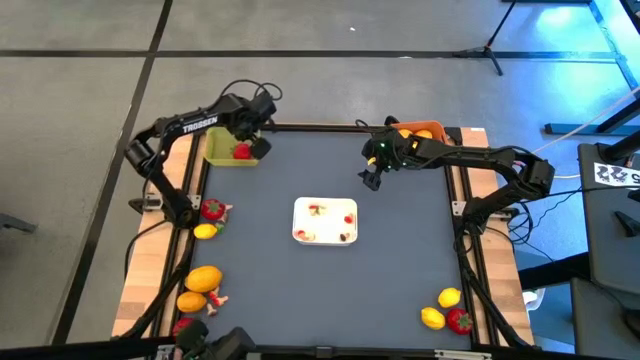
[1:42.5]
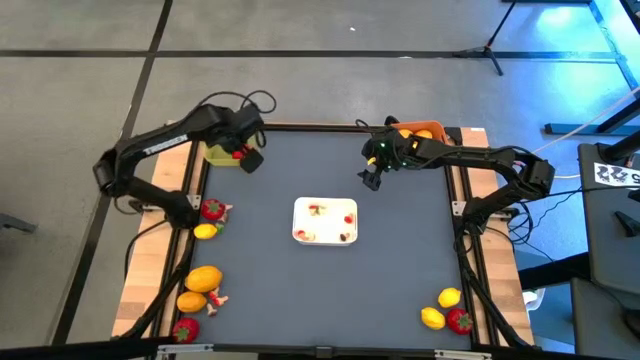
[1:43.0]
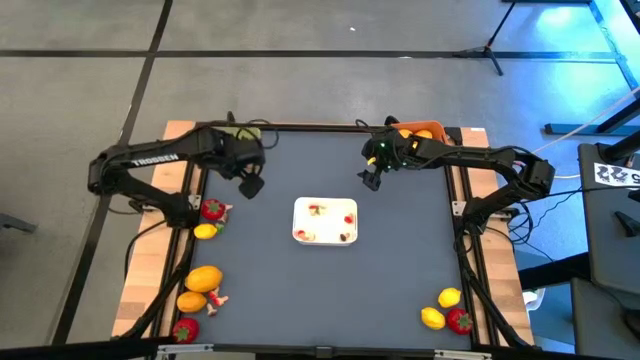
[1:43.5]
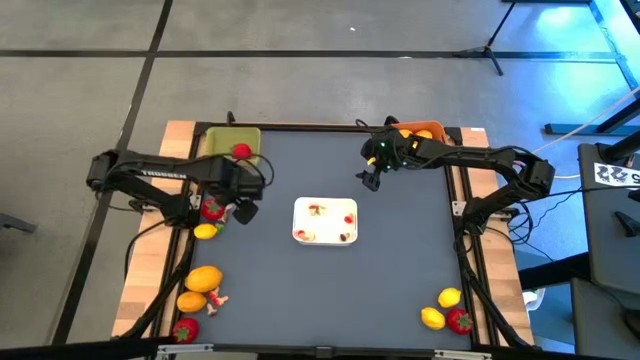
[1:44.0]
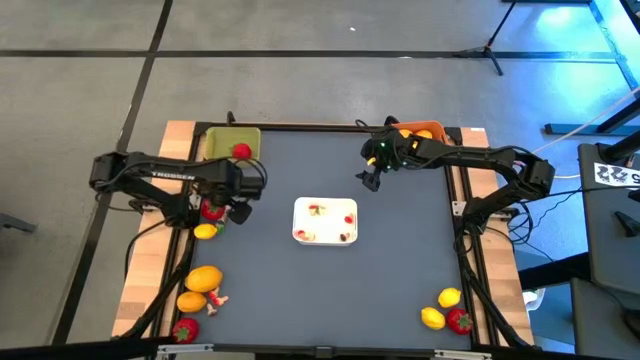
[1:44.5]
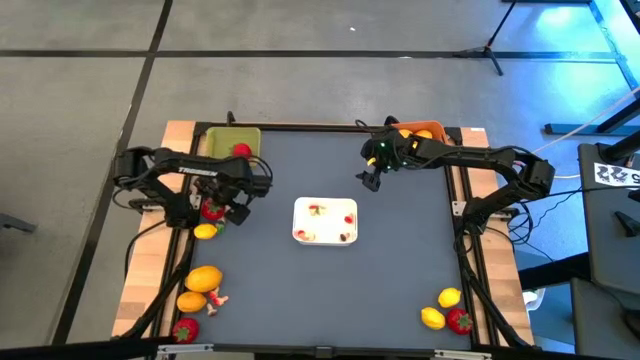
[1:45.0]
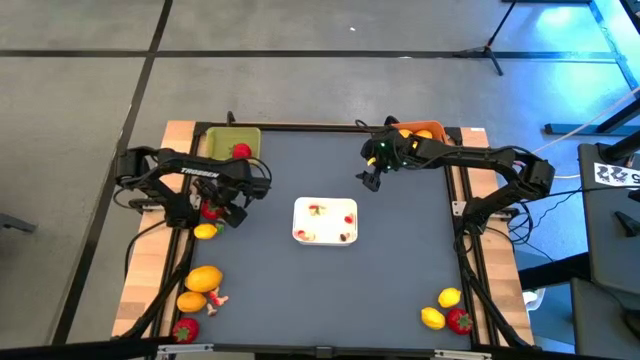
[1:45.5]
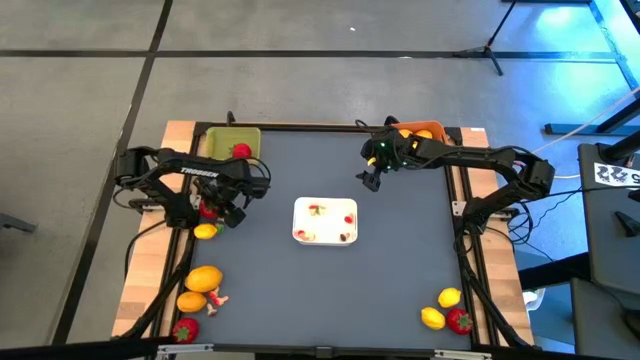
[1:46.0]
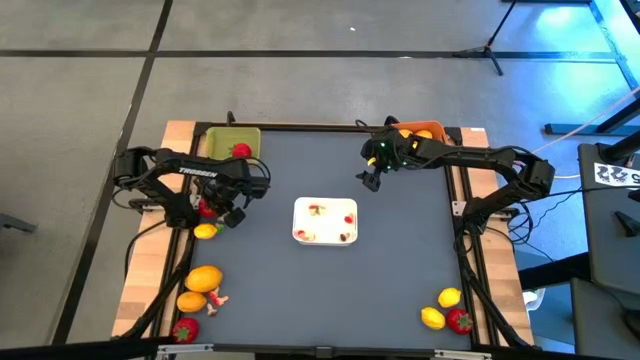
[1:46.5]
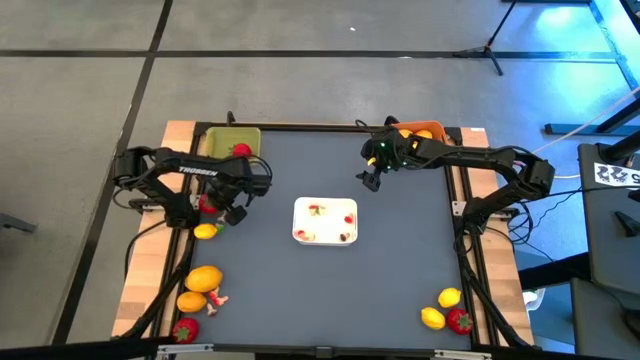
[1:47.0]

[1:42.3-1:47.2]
Task: Sort produce into baskets
Put the red tomato into the yellow bin

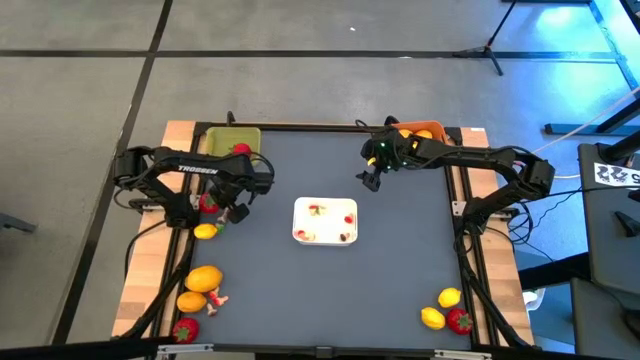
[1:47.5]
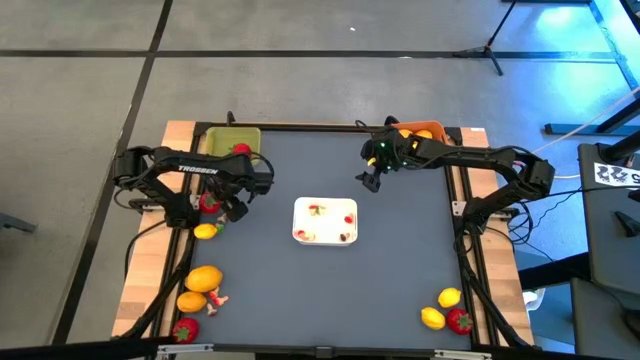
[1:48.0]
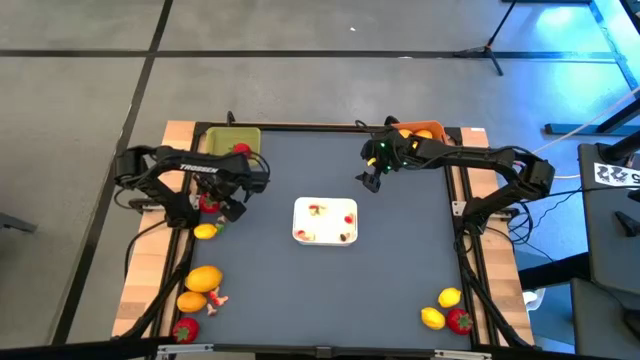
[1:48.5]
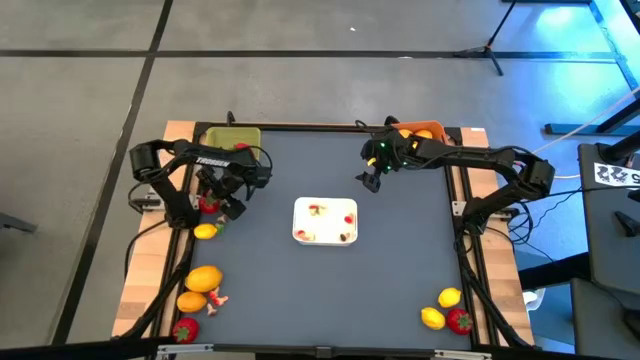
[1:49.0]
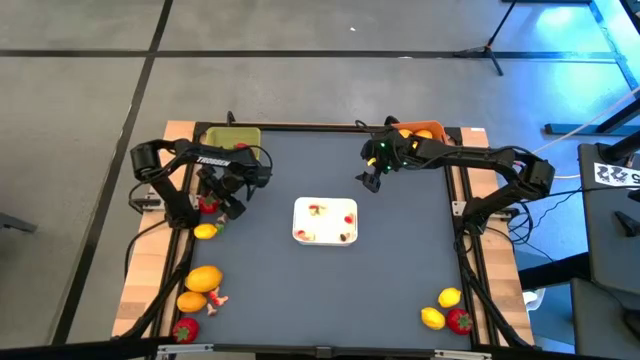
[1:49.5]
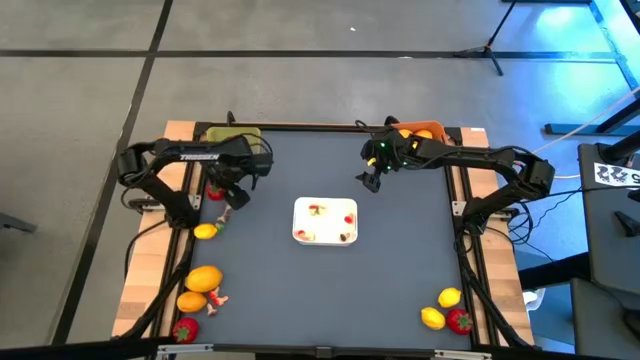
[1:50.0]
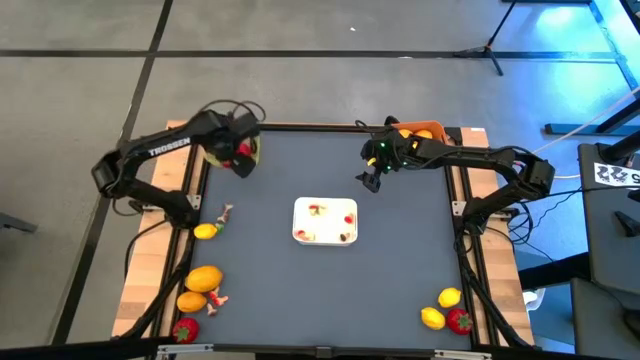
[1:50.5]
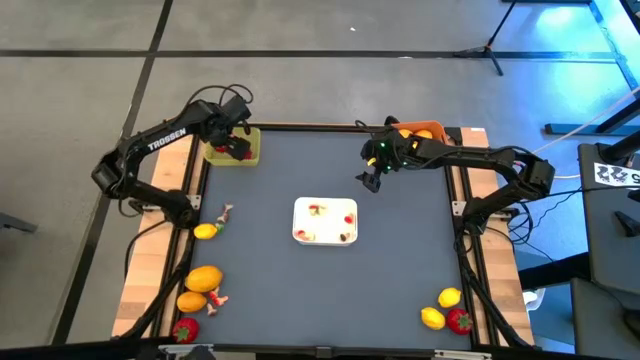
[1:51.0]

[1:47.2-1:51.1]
Put the red tomato into the yellow bin

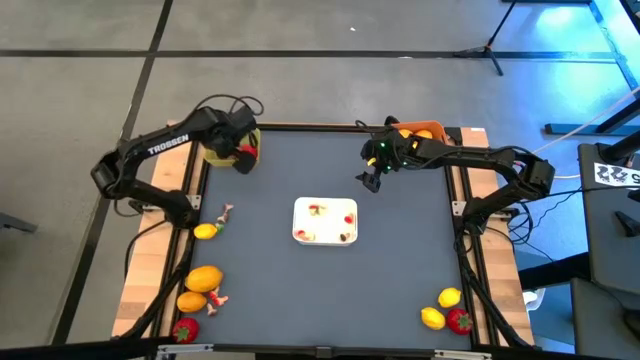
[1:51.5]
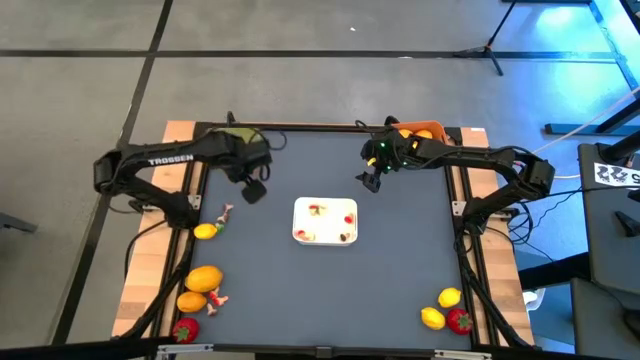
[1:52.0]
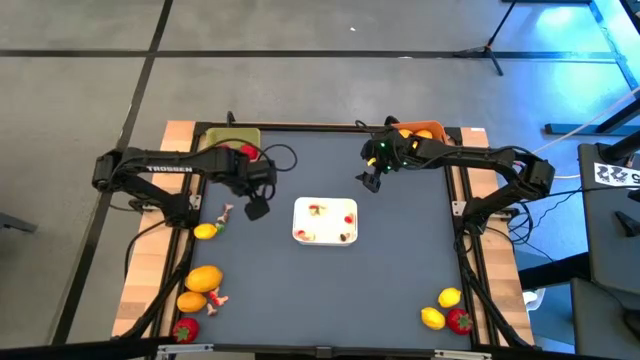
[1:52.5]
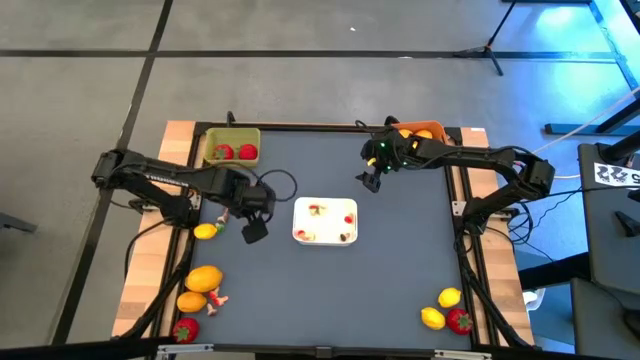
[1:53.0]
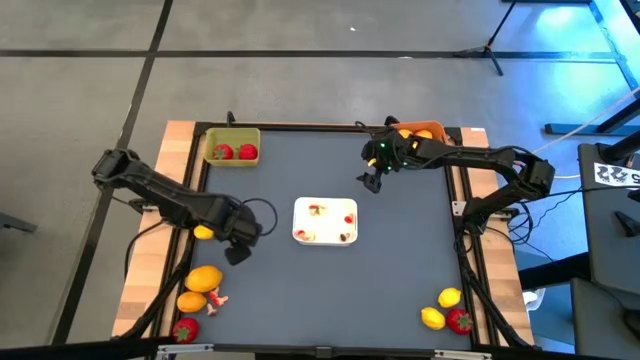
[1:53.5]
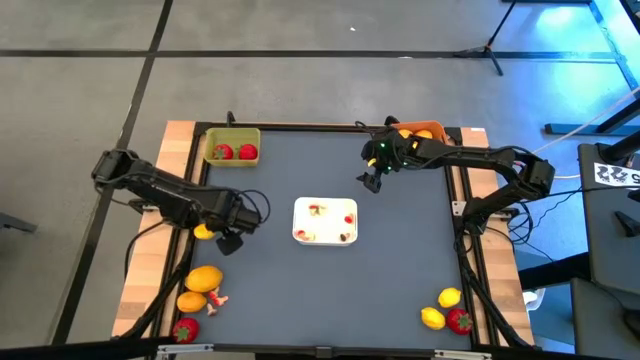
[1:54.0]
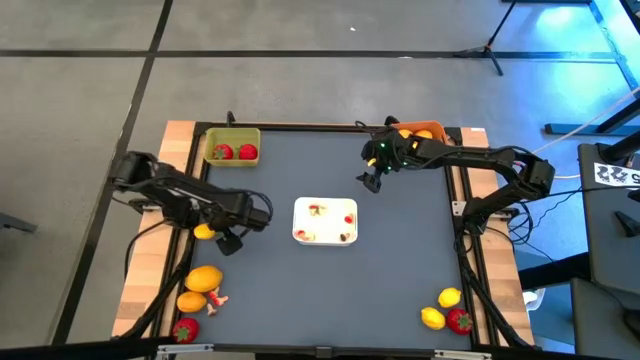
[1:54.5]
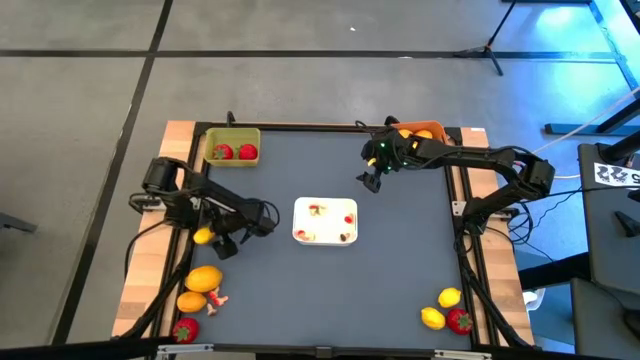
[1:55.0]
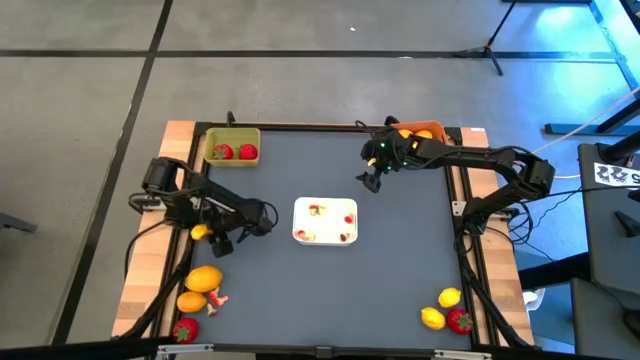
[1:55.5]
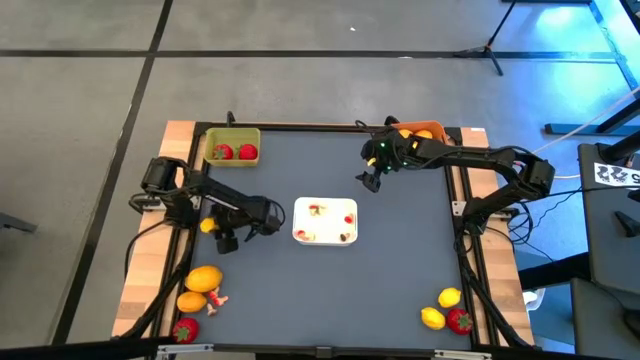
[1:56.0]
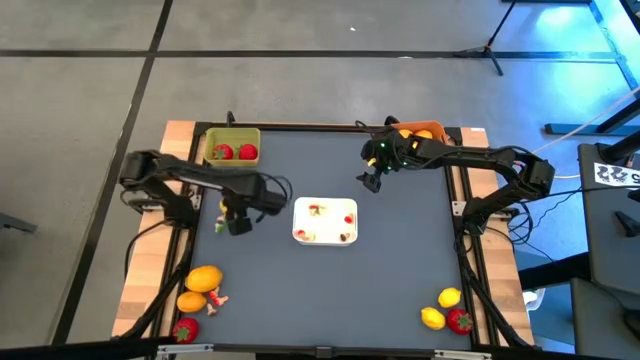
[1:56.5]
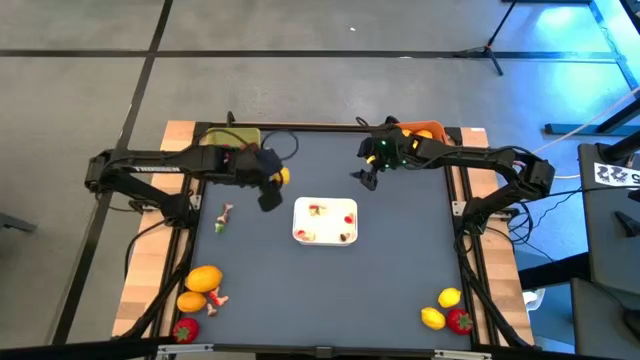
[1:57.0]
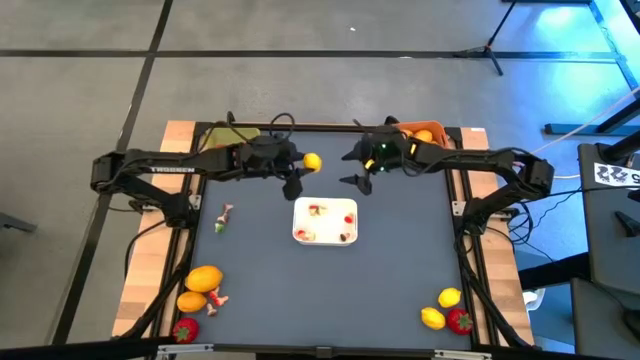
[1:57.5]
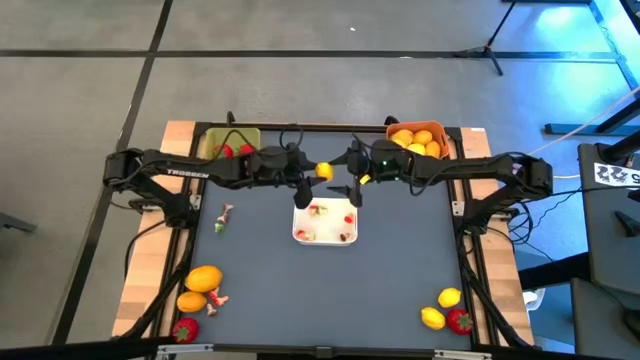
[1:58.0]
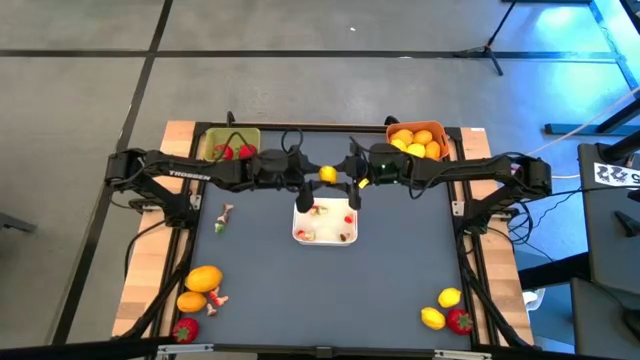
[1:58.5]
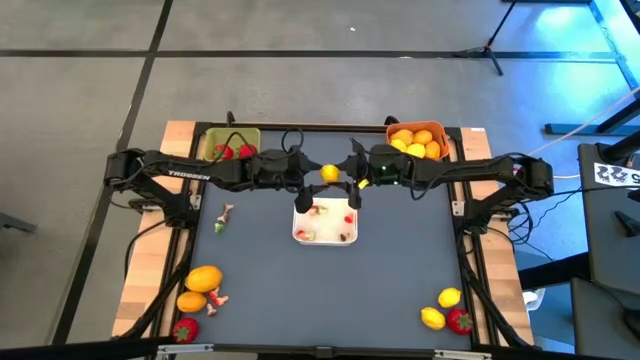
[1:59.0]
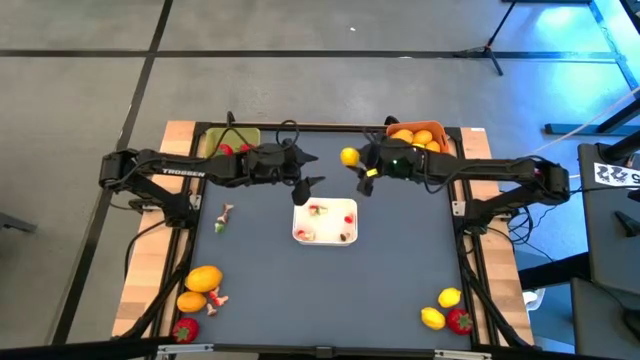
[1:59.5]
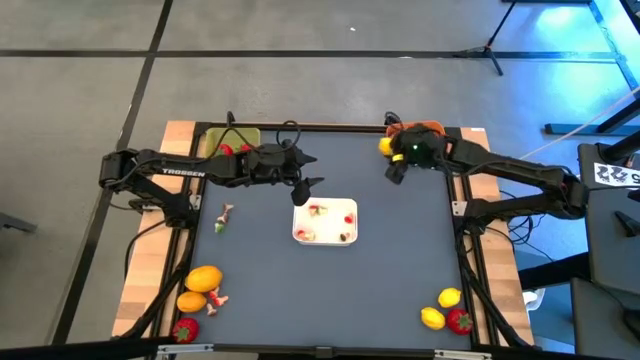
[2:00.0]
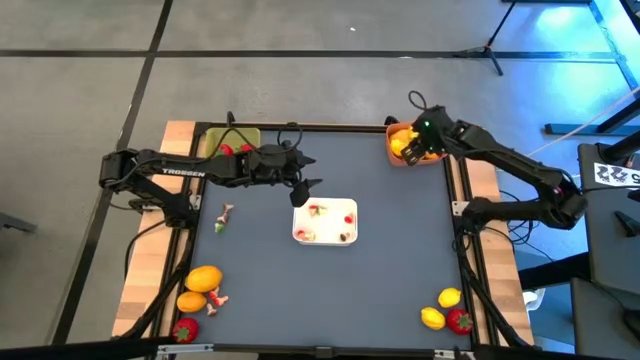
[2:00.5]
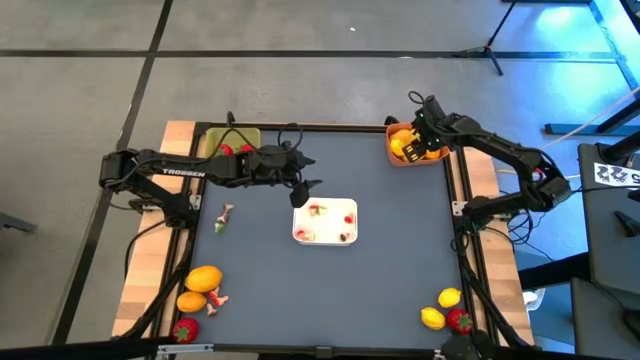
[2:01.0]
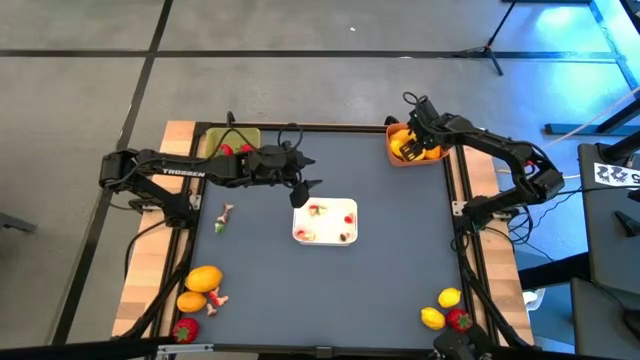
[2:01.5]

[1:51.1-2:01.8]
Put the yellow lemon into the orange bin

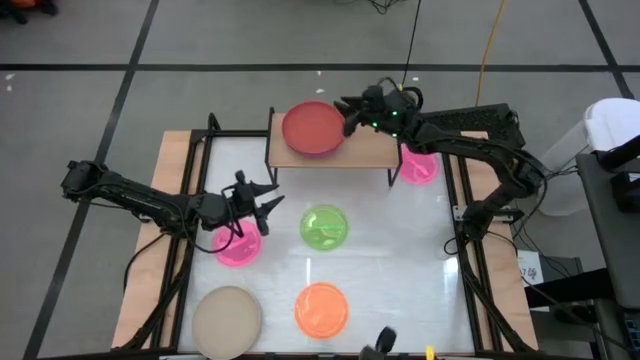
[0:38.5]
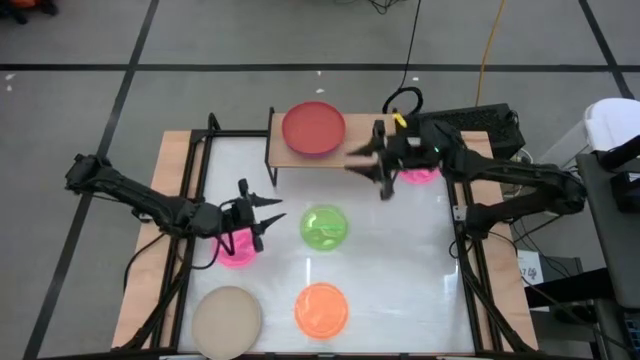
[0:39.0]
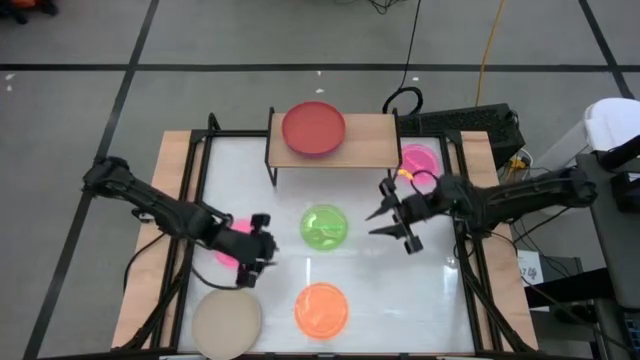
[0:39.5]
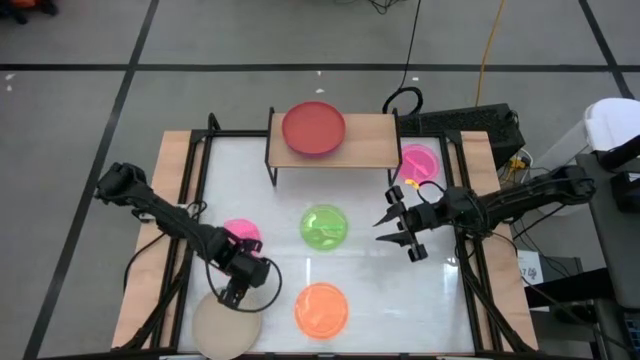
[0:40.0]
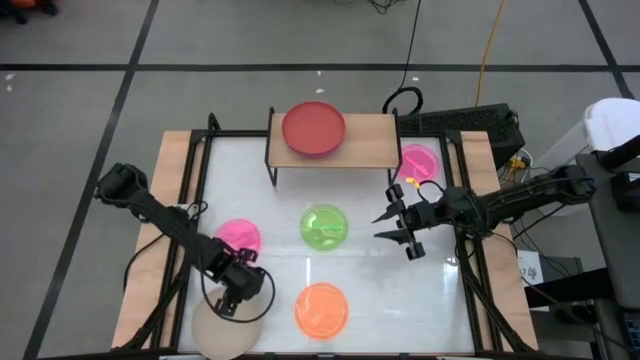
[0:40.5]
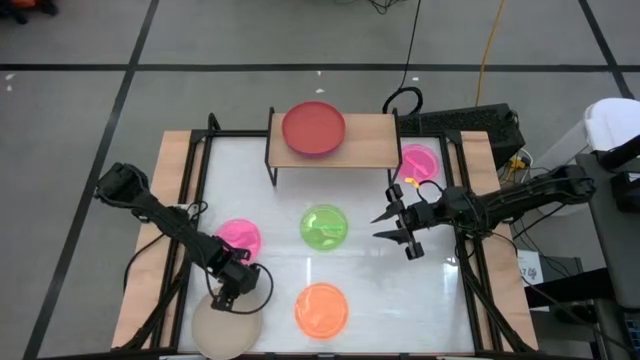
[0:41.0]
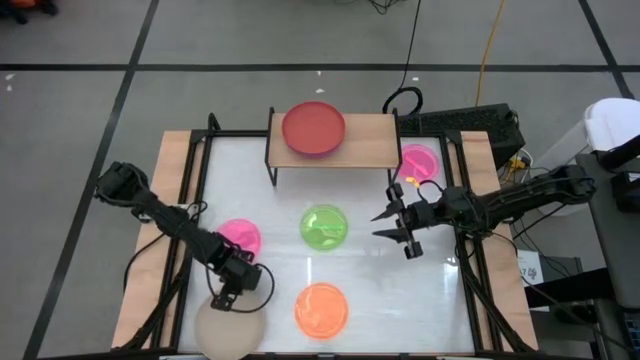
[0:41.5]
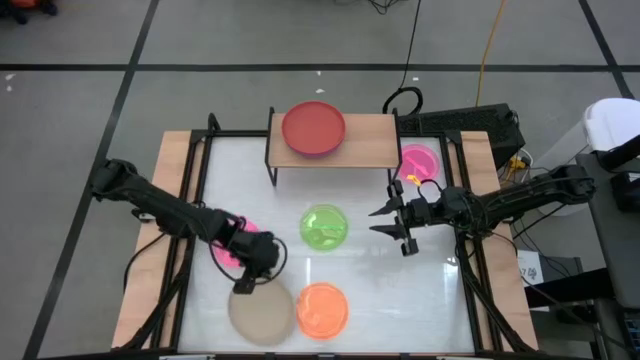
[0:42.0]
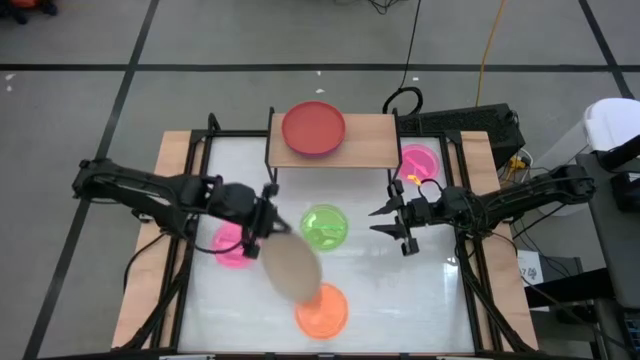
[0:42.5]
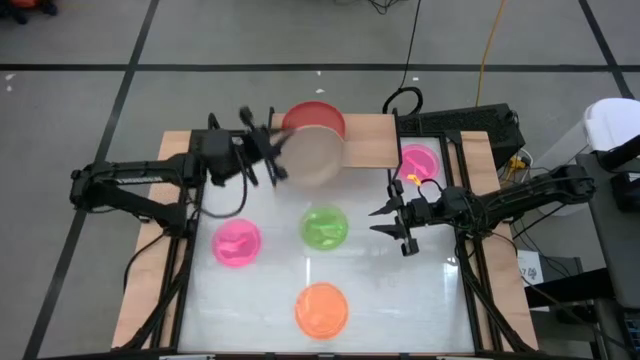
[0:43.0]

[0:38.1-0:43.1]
Task: Place and stack plates onto a shelf
Stack the gray plate on top of the orange plate on the shelf
